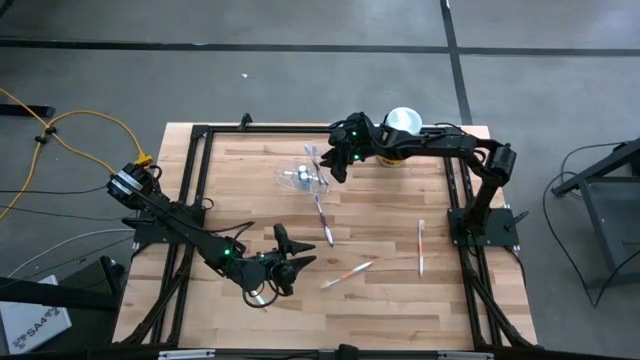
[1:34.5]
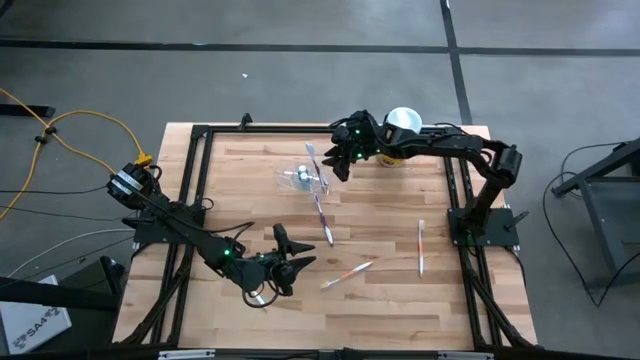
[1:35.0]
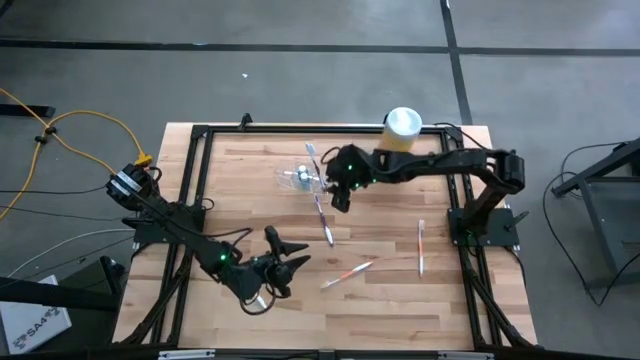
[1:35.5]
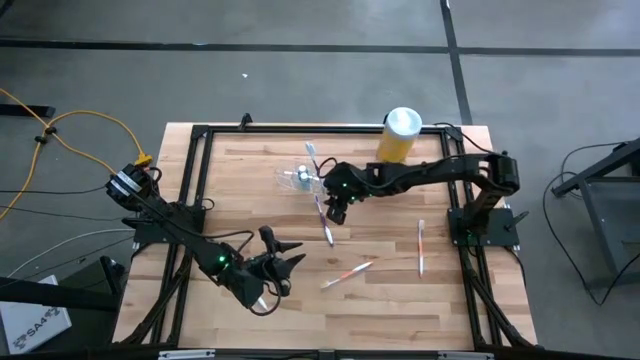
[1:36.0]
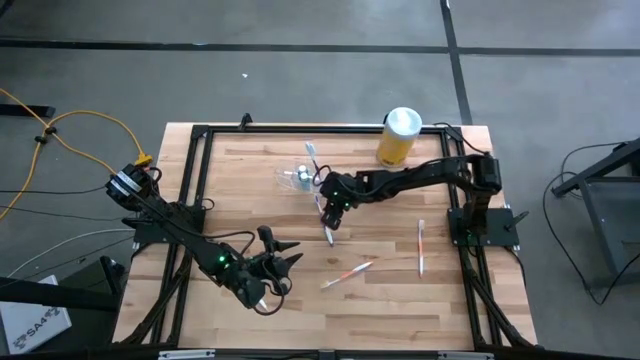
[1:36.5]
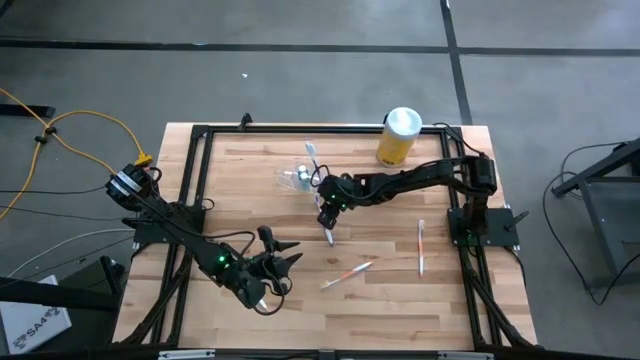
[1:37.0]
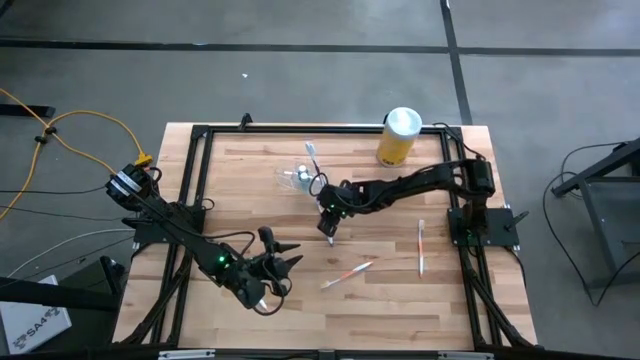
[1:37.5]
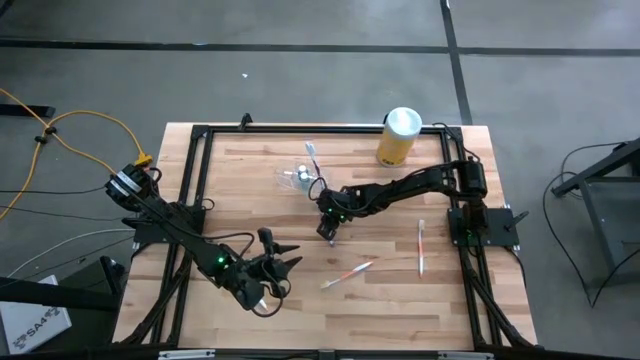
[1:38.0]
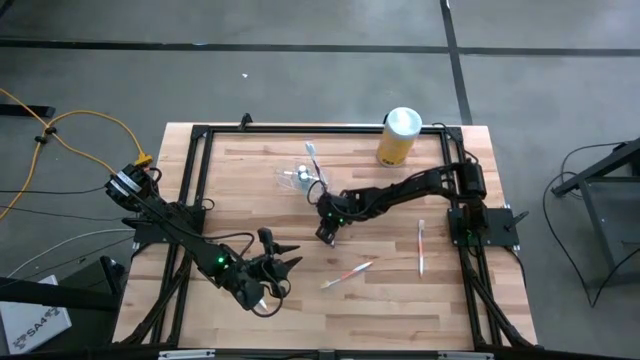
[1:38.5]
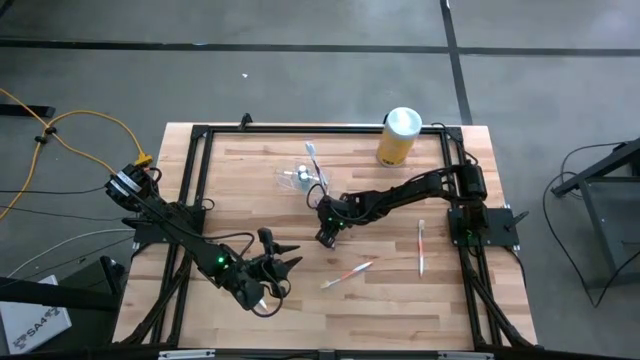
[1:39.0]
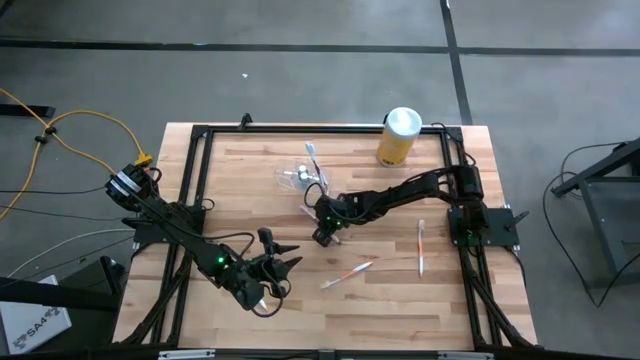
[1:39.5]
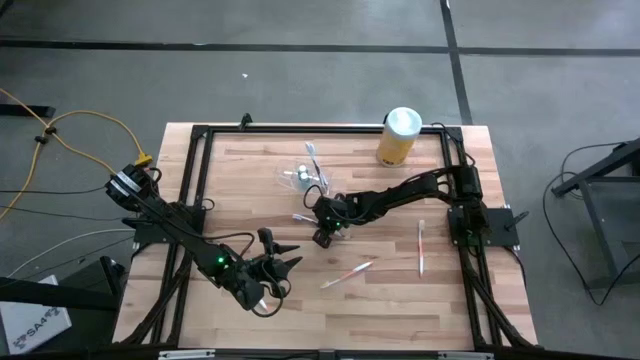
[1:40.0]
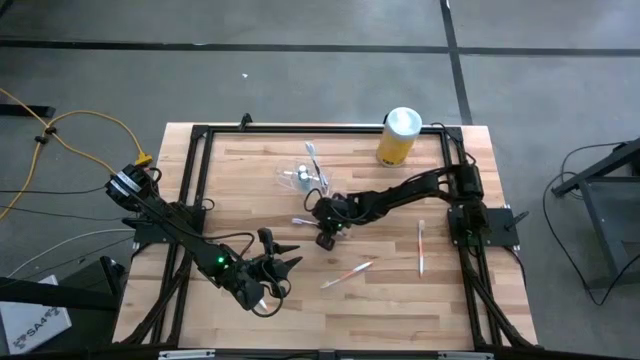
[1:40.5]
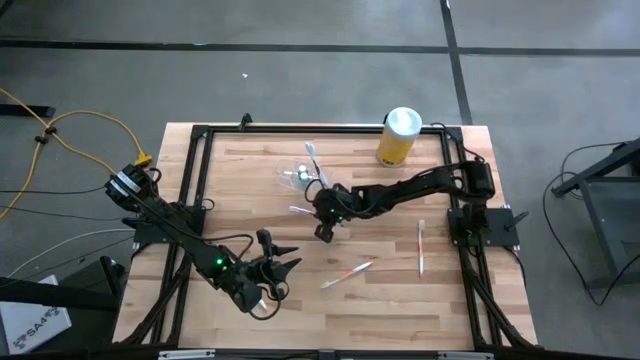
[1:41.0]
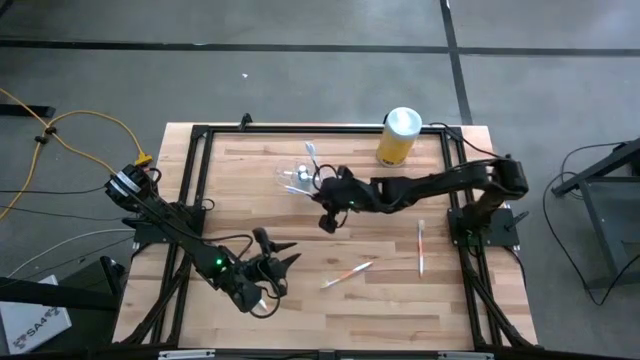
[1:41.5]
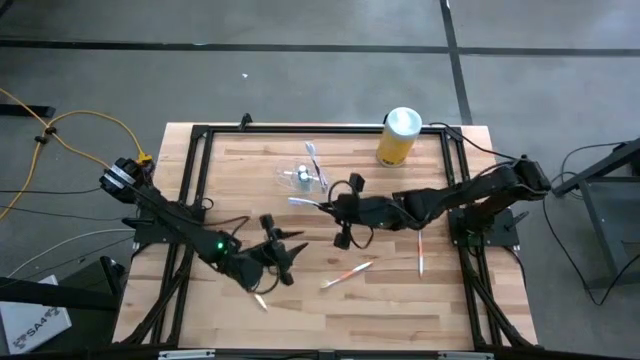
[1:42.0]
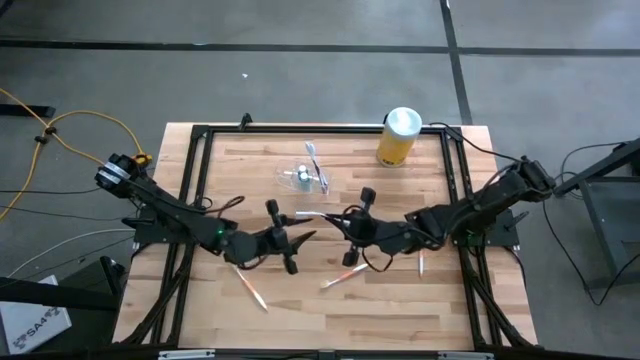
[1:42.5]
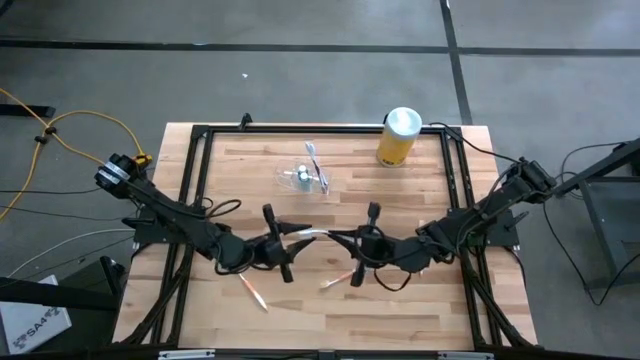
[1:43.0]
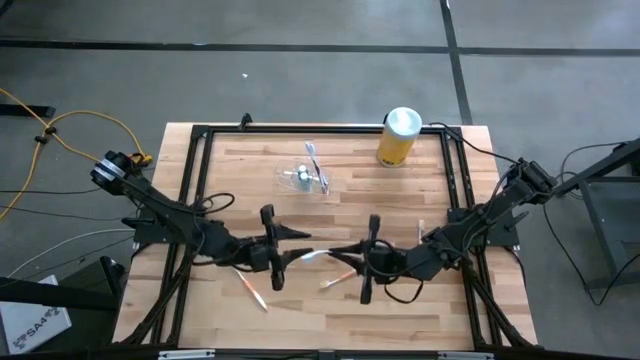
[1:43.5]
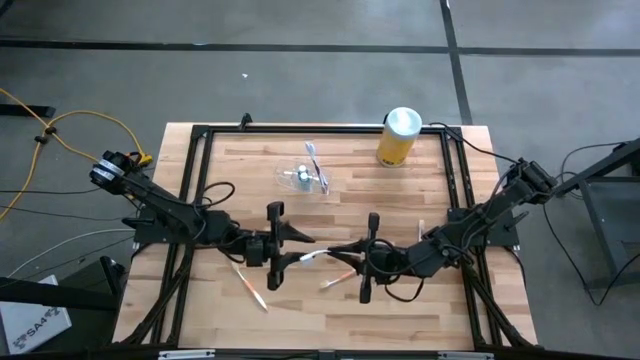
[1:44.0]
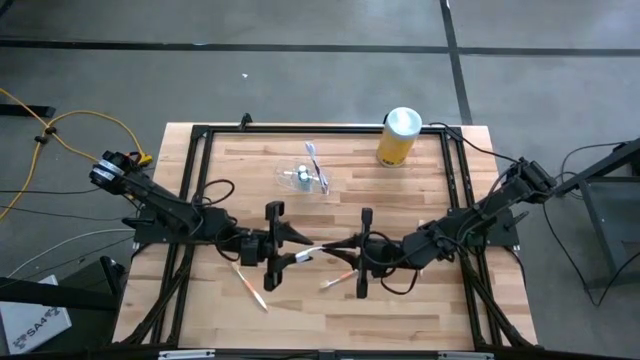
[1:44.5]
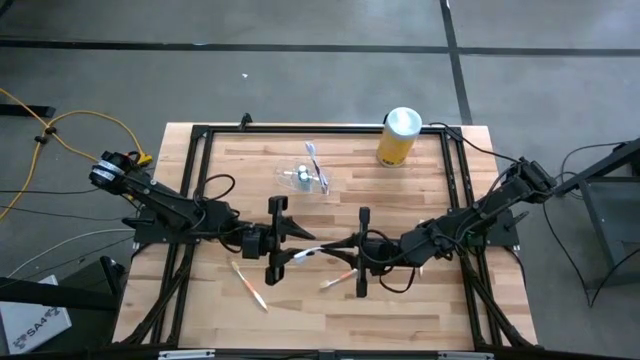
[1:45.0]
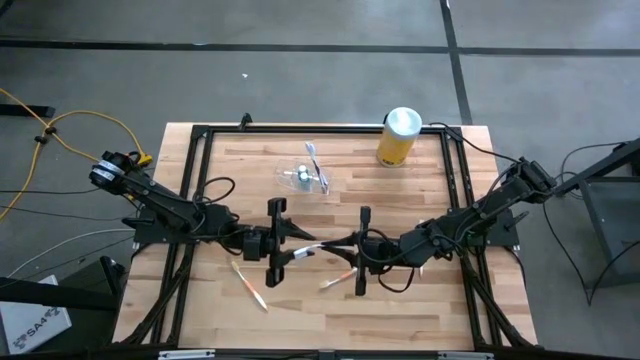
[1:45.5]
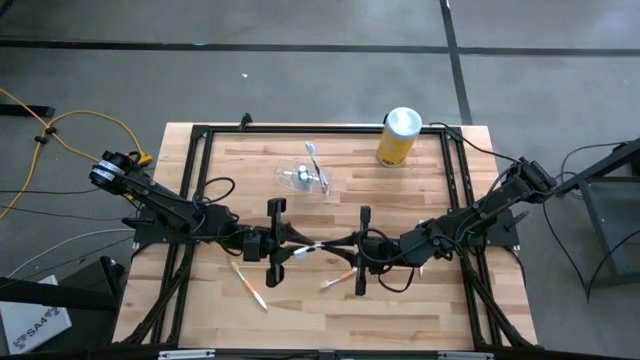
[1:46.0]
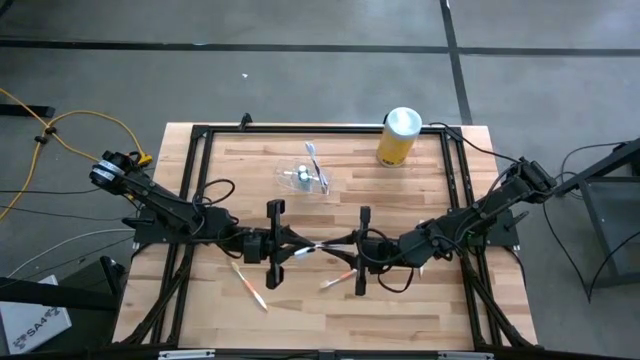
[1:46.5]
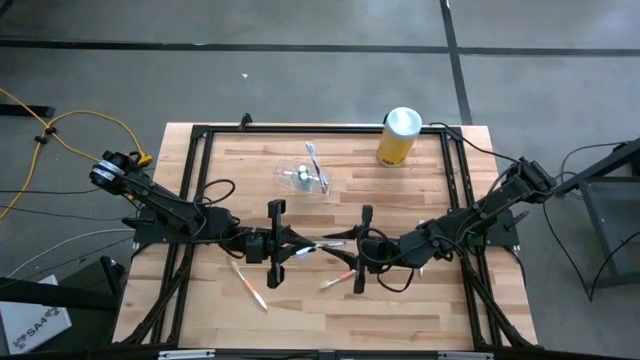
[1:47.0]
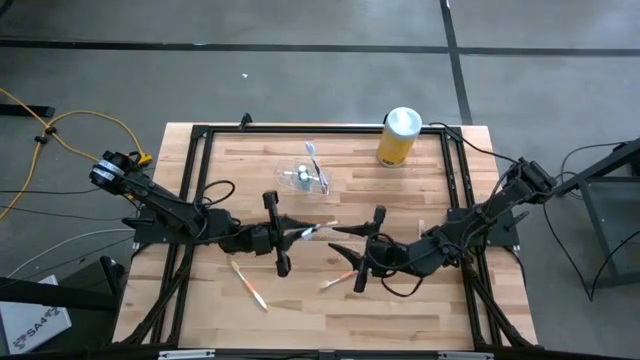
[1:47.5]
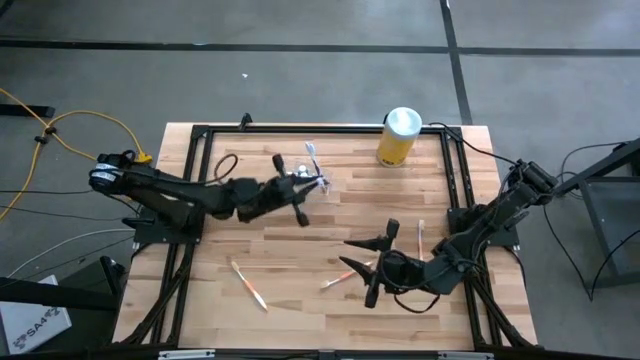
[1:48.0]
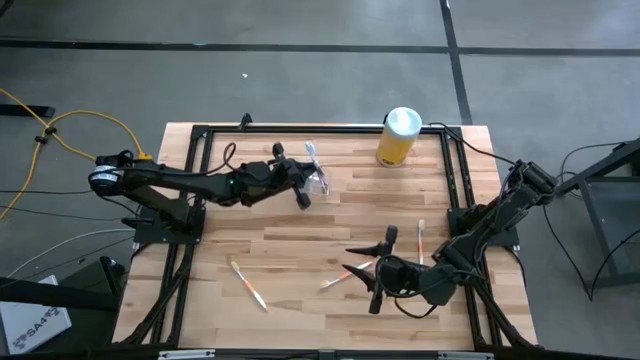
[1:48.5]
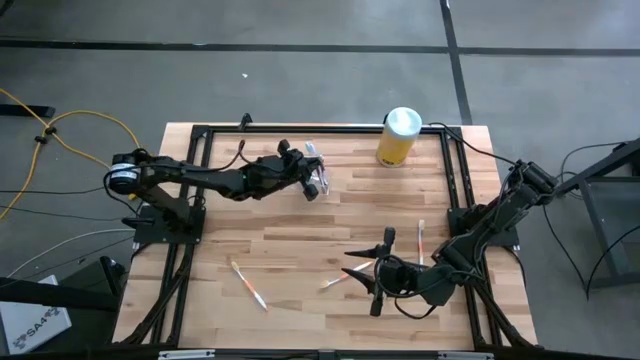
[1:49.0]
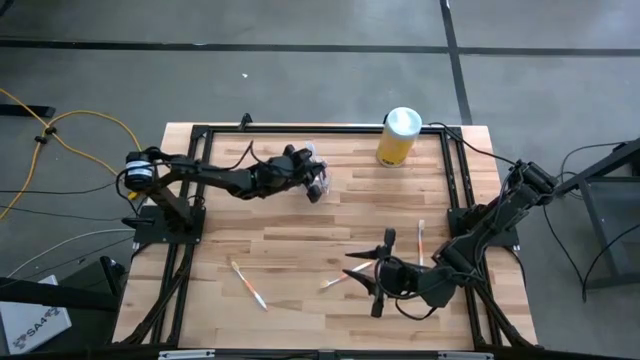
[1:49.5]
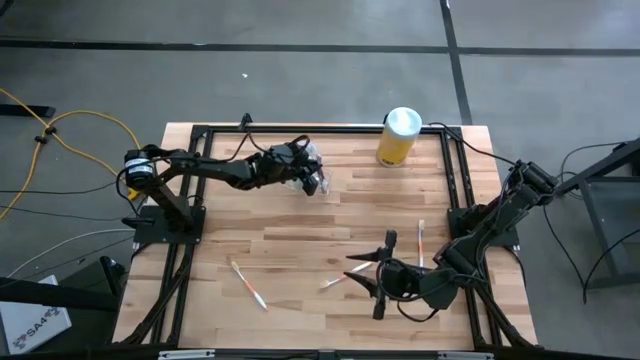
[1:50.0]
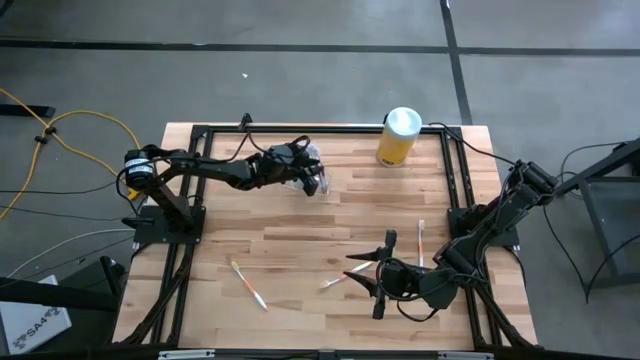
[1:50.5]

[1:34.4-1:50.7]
Task: Pick & Place toothbrushing station
Put the violet toothbrush into transparent organizer

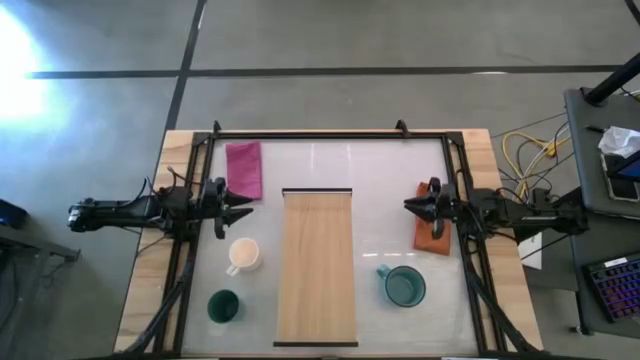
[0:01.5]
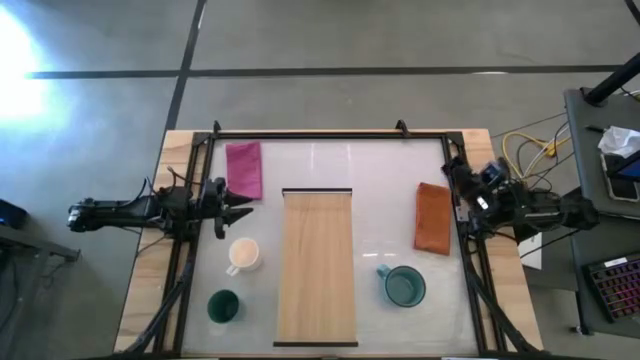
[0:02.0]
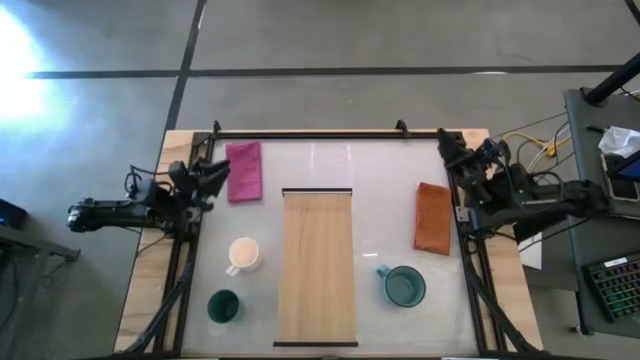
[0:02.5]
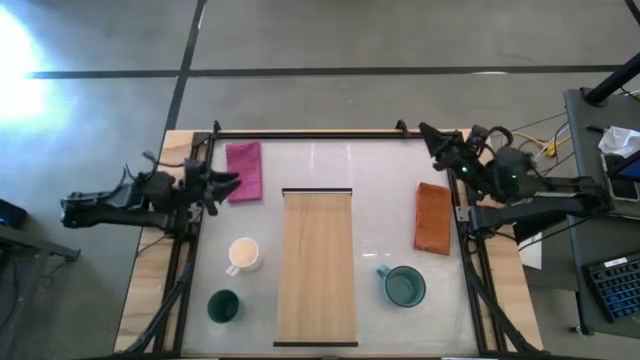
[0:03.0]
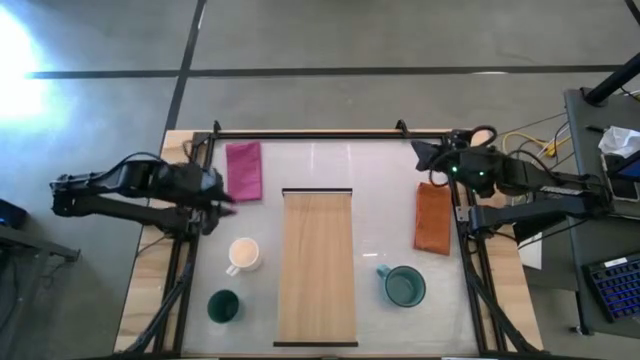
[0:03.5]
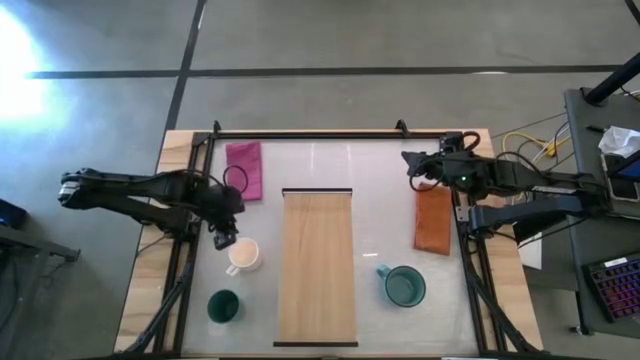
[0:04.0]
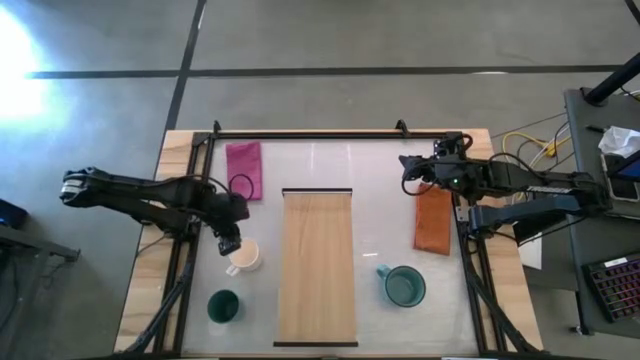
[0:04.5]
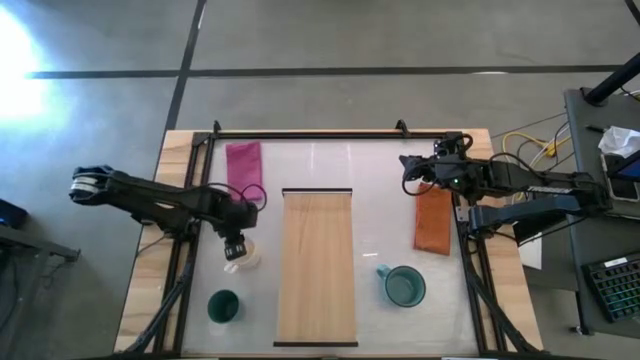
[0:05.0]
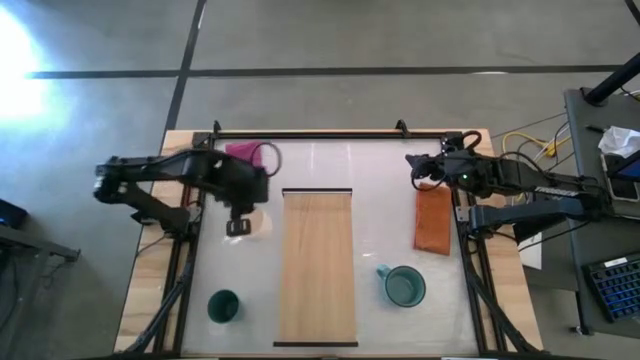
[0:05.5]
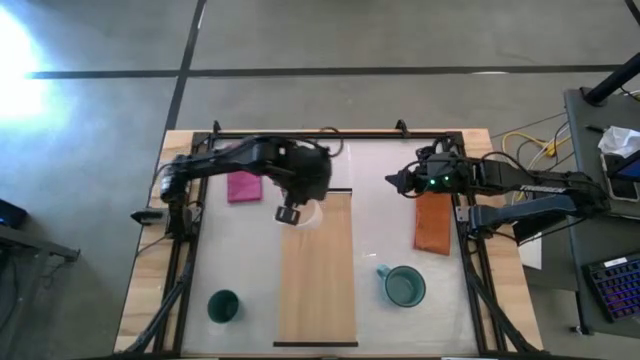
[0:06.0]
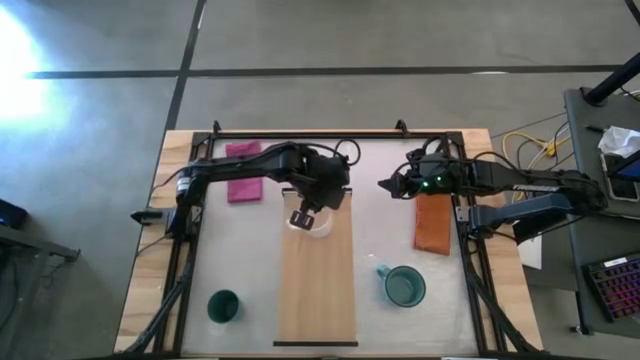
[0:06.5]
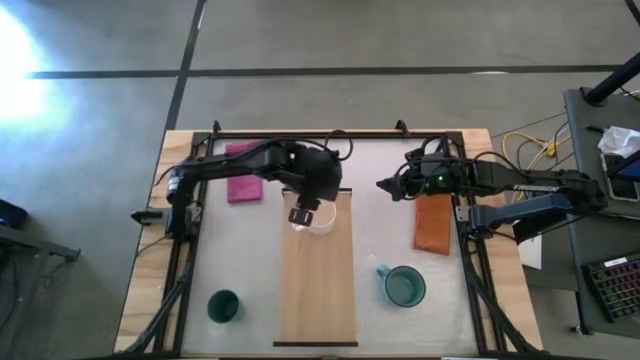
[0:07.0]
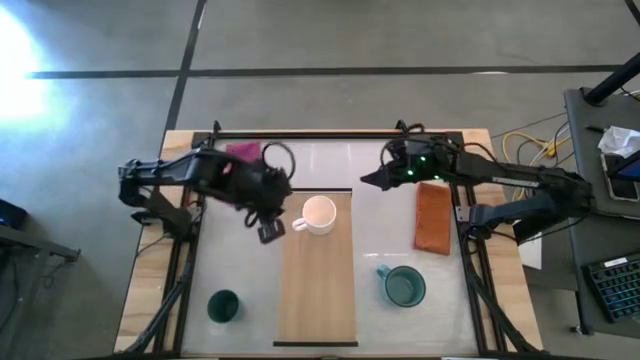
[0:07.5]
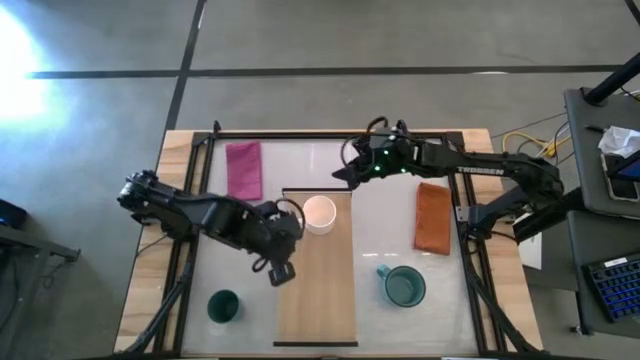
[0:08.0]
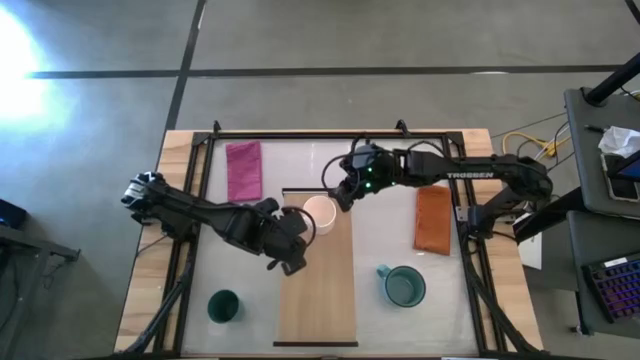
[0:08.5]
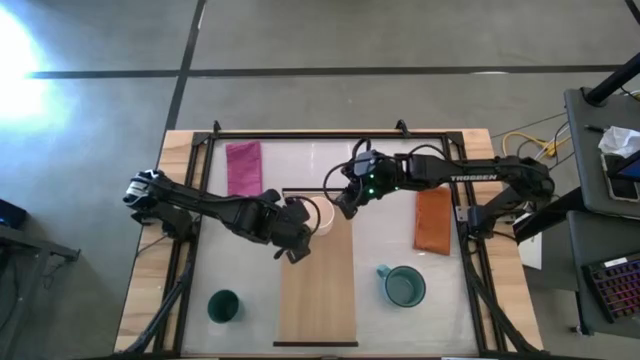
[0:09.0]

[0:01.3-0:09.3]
Task: Stack small to large cups/mugs on shelf
Put the white cup on the shelf
